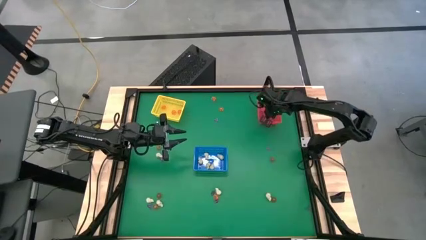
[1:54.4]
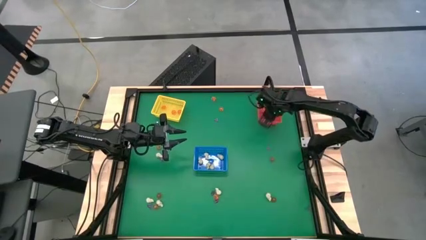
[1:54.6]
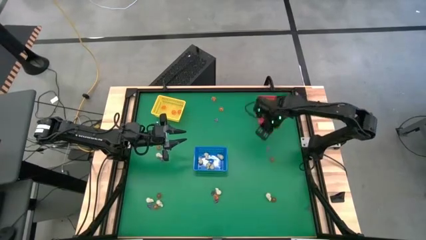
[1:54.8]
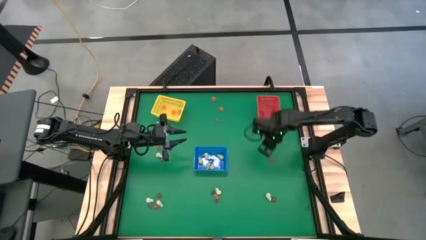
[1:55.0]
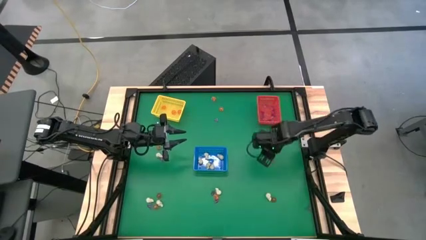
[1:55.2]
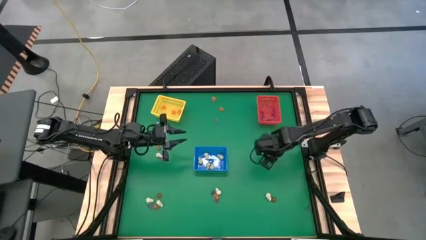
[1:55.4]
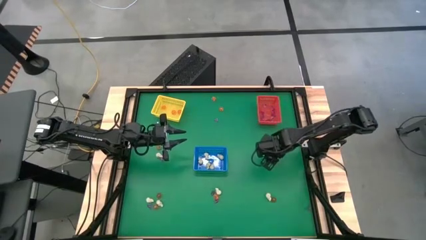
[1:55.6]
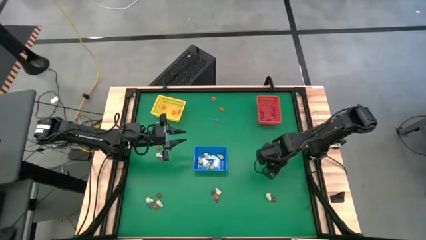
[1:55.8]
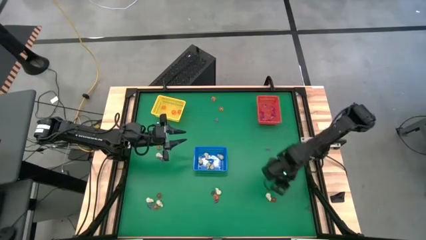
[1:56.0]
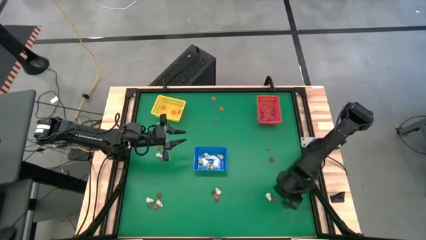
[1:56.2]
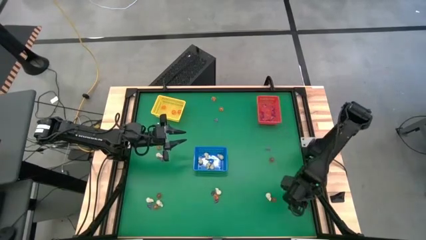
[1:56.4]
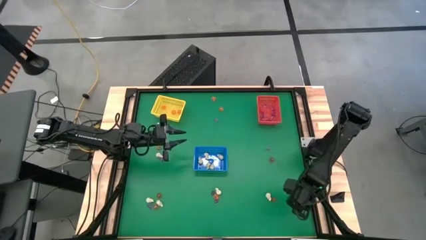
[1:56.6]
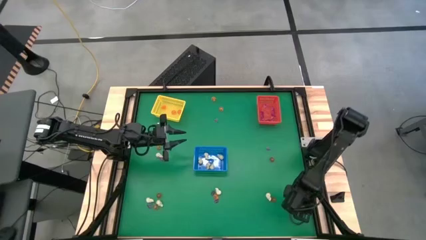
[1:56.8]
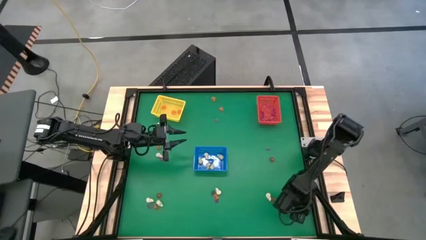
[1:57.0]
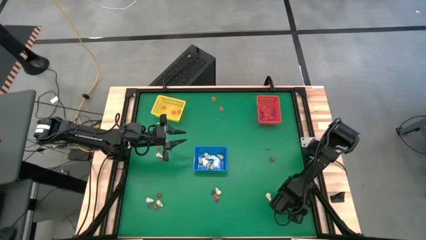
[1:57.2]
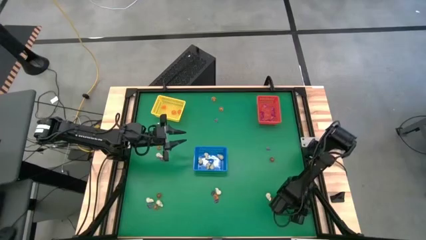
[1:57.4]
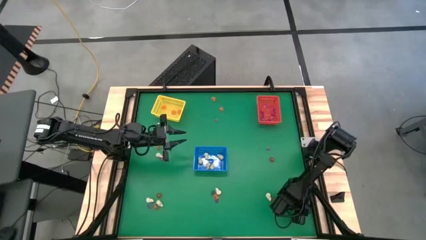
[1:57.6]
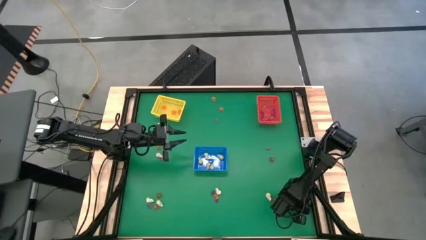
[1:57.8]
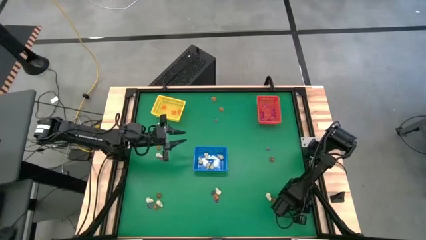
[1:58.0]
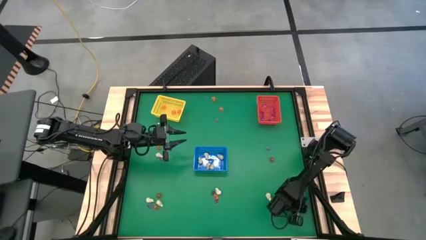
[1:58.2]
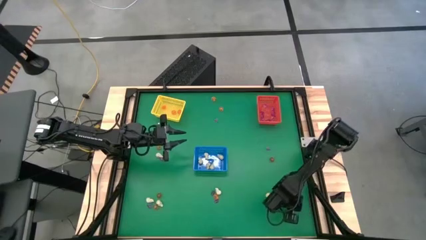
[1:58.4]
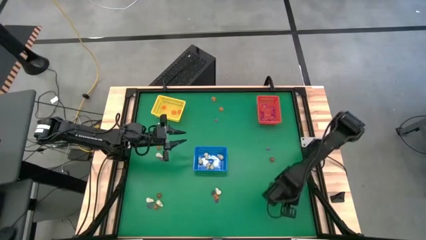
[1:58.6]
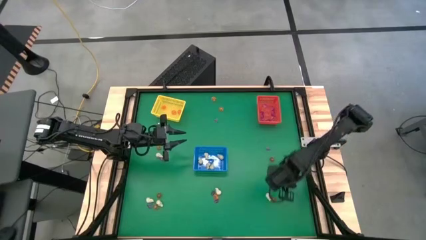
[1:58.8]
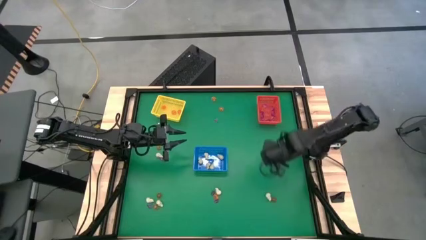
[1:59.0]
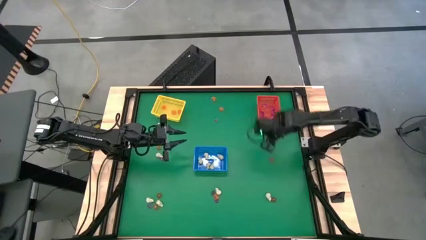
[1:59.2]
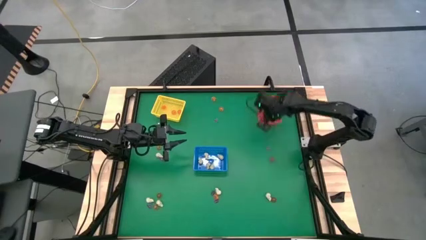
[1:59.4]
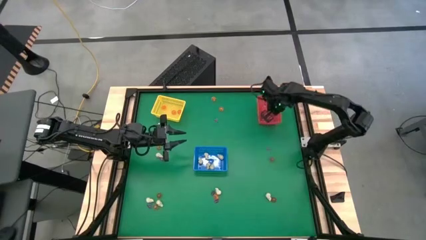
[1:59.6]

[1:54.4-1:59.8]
Task: Sort Halloween decoration
Put the purple witch hat toy into the red bin

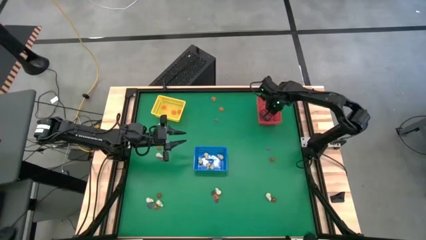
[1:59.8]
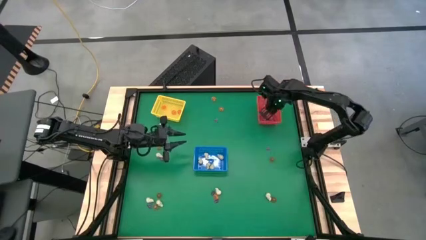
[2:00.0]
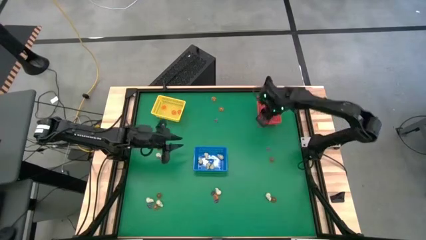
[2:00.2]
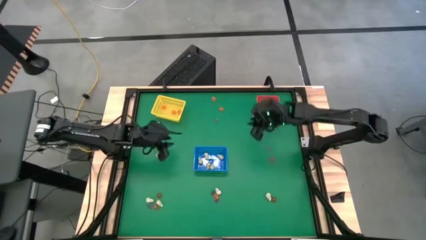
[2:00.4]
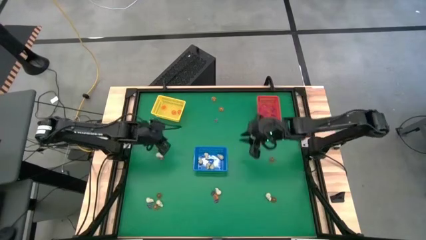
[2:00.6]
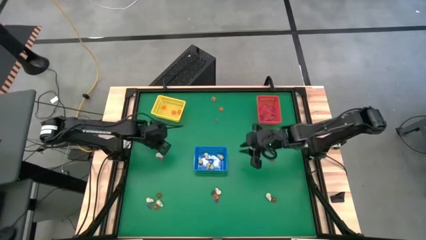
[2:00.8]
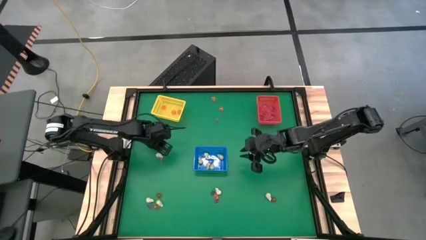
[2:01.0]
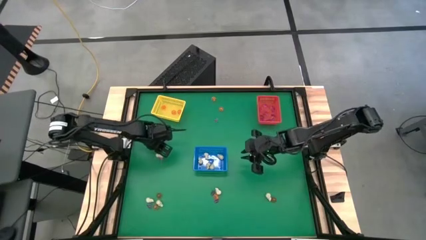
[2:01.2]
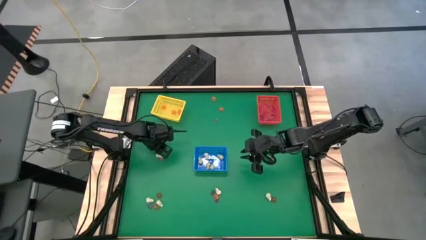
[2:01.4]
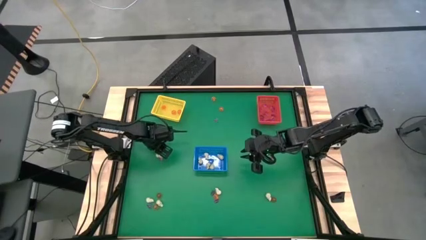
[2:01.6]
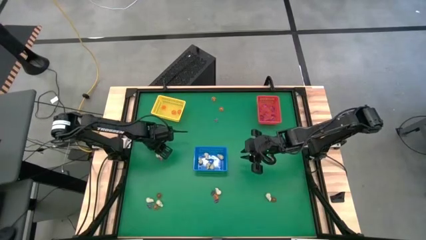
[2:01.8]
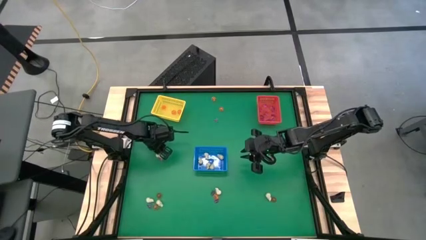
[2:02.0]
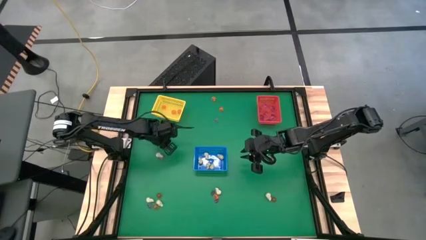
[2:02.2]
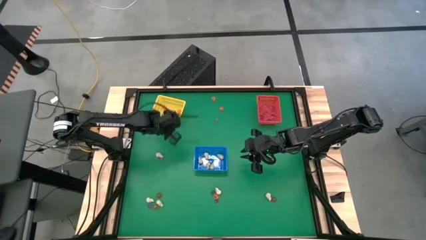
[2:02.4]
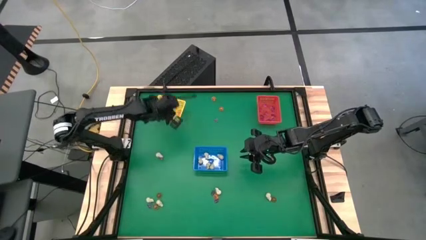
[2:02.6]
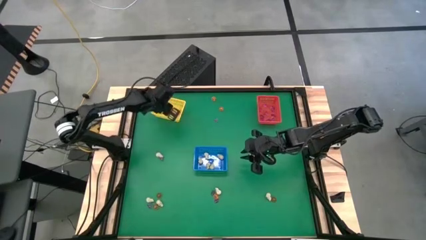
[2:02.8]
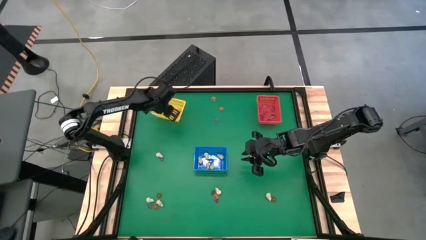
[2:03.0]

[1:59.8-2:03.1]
Put the orange pumpkin toy into the yellow bin

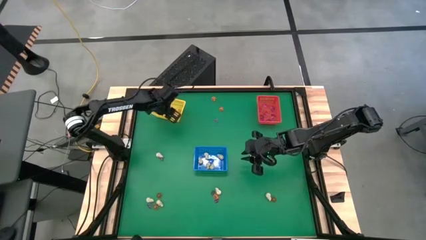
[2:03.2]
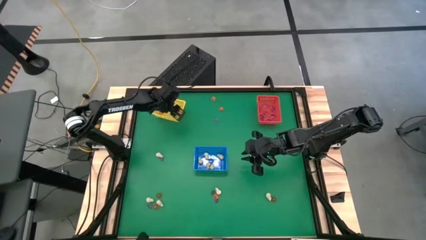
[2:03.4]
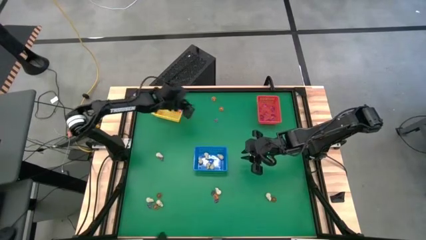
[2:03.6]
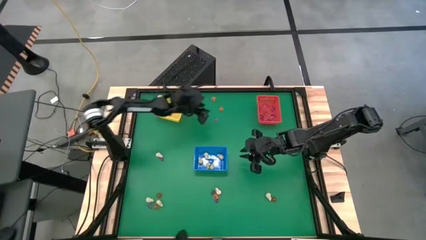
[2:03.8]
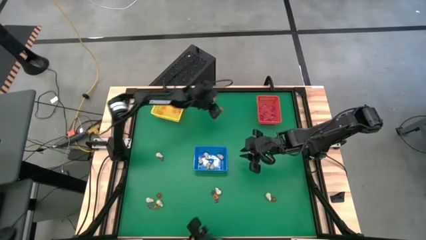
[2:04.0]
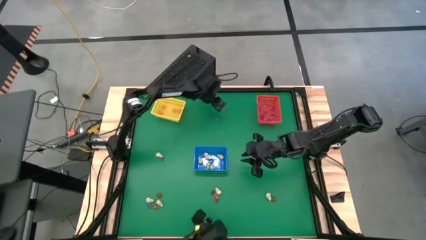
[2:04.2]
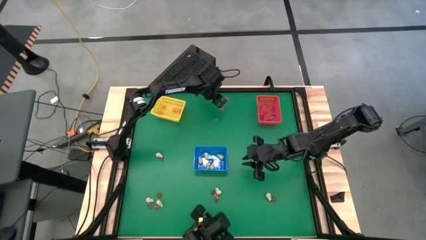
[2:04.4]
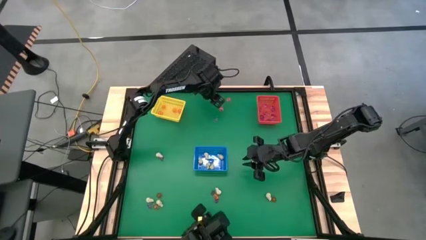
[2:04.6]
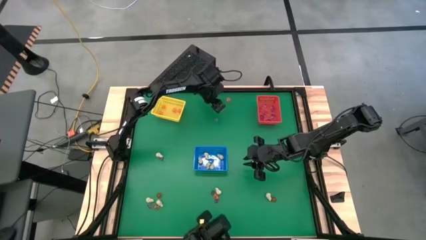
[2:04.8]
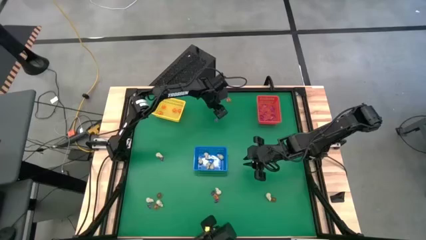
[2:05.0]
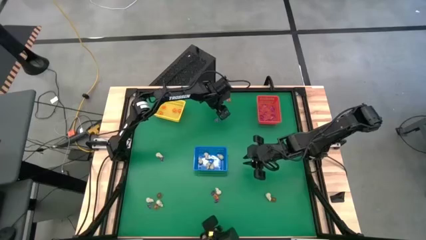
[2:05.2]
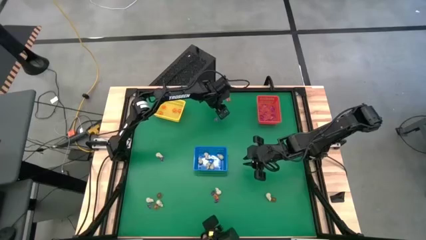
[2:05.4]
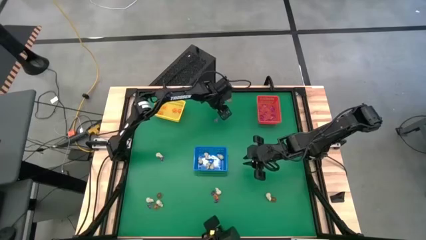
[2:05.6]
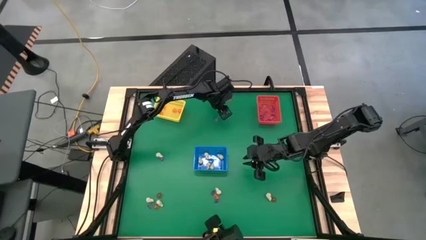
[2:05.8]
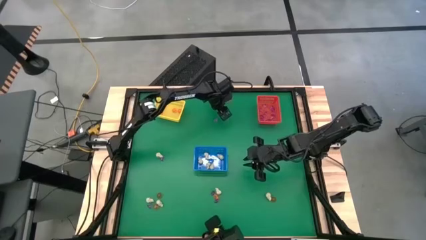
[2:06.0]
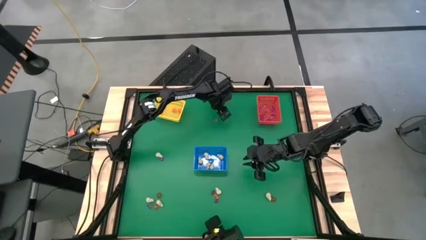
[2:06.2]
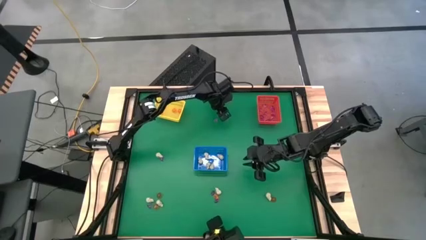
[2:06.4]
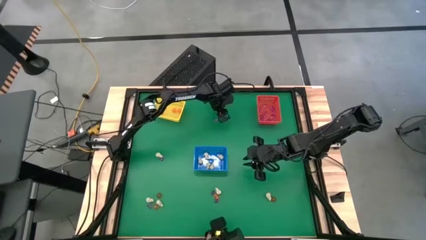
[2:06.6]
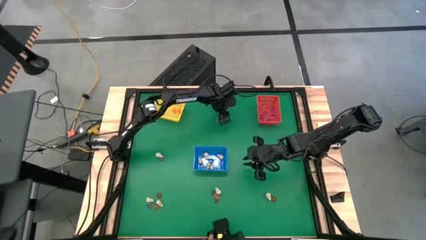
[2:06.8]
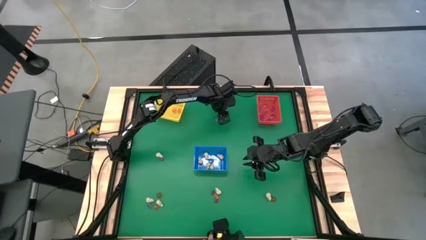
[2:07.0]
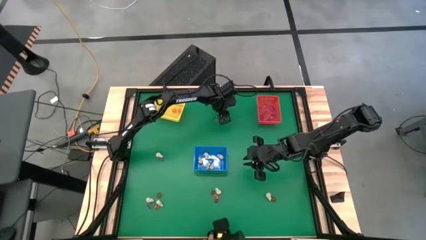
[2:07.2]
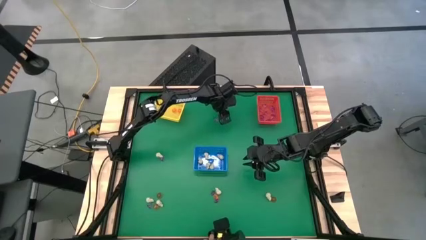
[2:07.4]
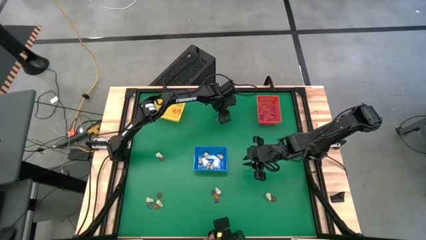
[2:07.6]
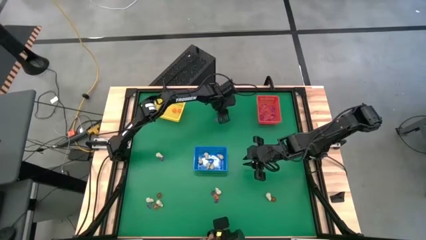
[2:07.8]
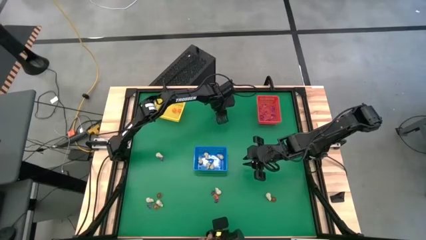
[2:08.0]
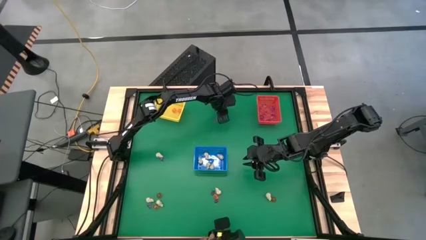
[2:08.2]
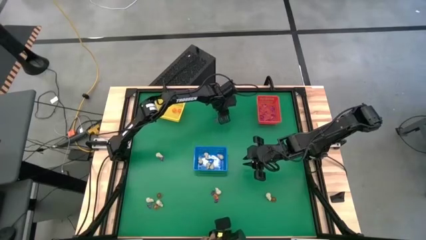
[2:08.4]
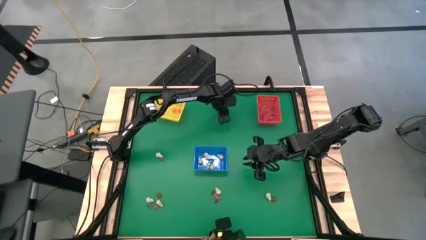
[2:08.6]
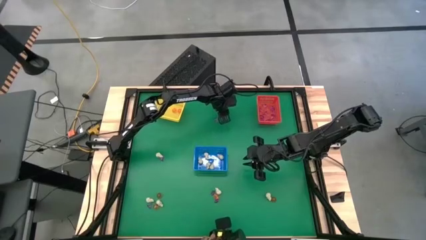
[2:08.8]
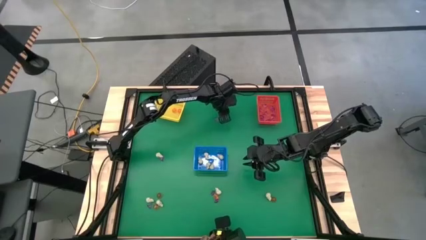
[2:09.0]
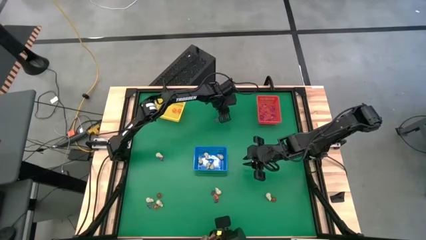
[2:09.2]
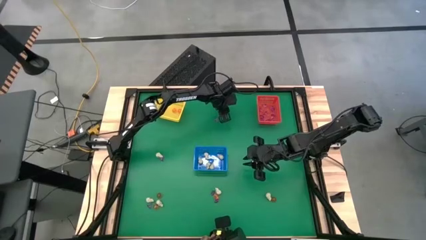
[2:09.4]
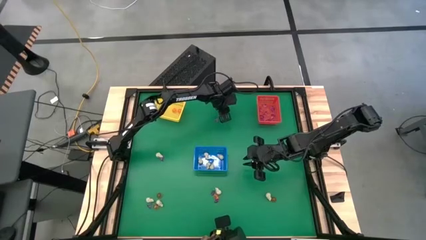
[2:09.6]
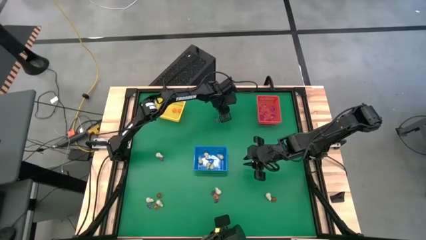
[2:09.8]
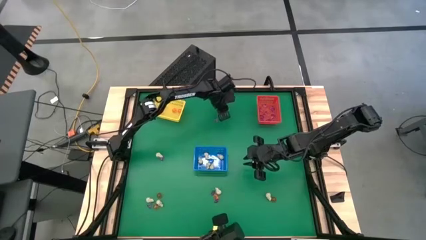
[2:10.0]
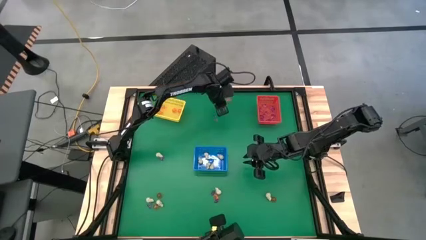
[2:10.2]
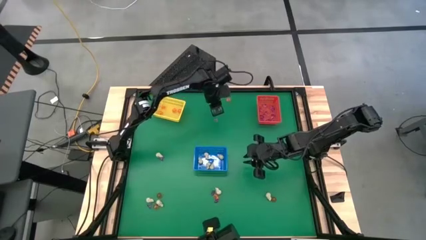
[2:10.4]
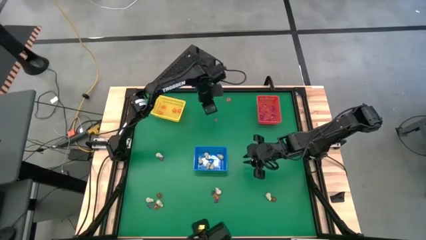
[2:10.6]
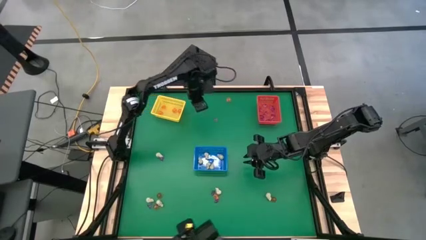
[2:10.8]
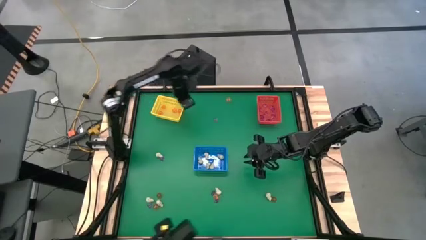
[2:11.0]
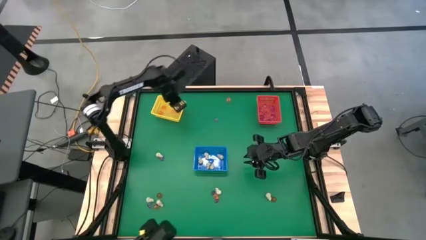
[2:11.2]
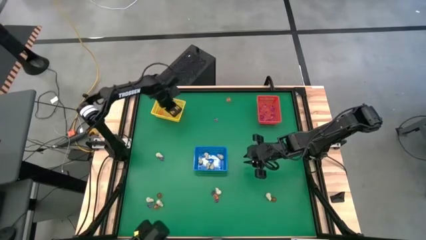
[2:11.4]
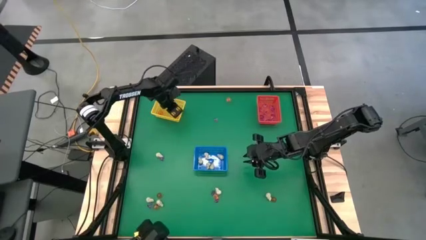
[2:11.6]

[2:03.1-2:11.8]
Put the orange pumpkin toy into the yellow bin
